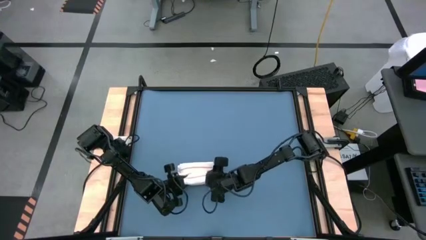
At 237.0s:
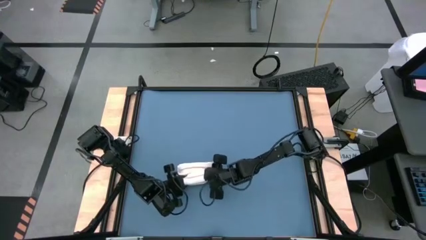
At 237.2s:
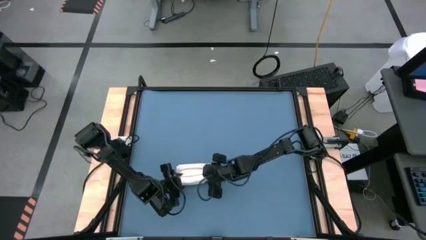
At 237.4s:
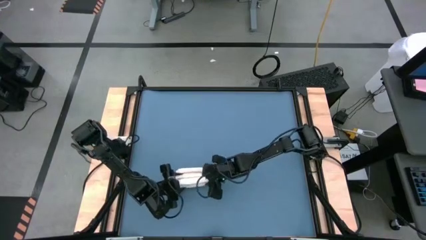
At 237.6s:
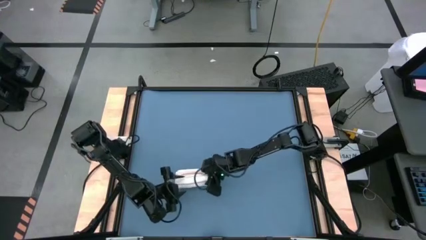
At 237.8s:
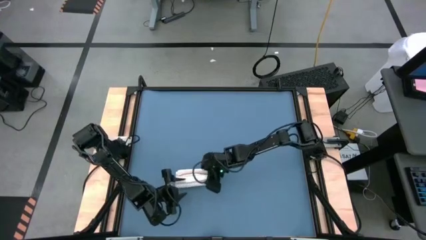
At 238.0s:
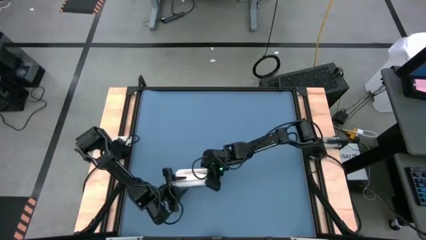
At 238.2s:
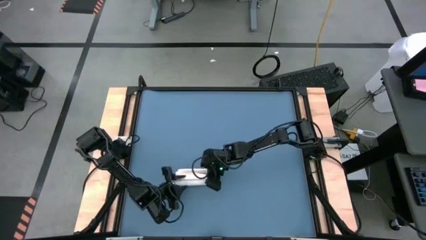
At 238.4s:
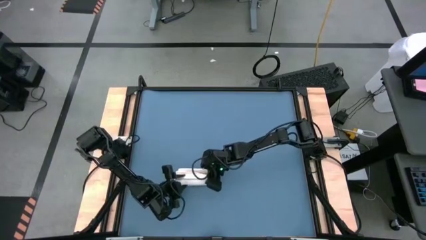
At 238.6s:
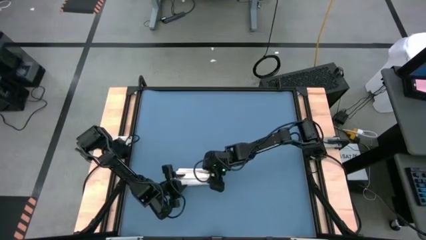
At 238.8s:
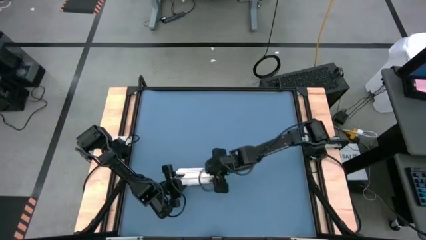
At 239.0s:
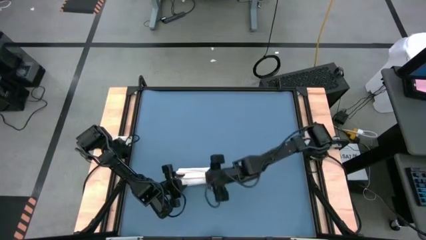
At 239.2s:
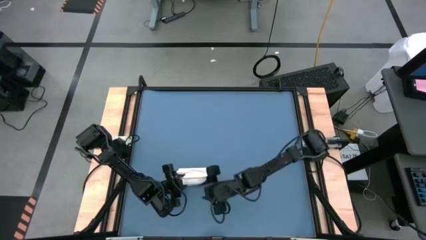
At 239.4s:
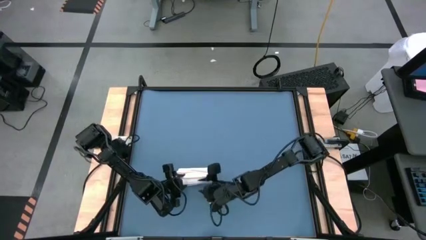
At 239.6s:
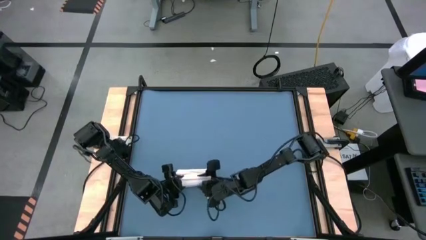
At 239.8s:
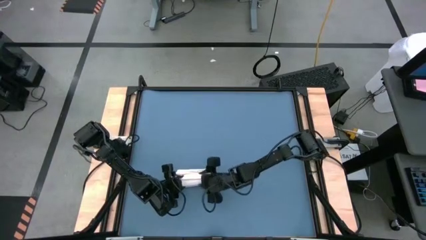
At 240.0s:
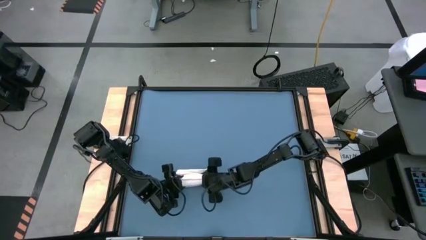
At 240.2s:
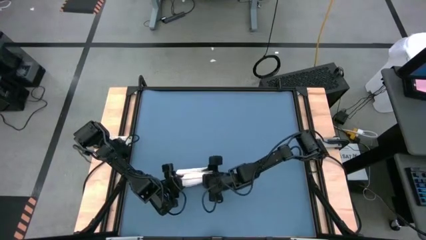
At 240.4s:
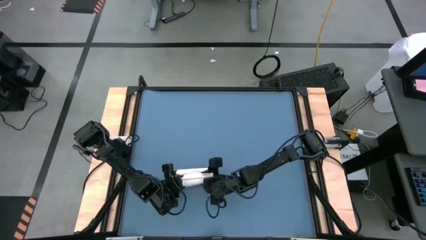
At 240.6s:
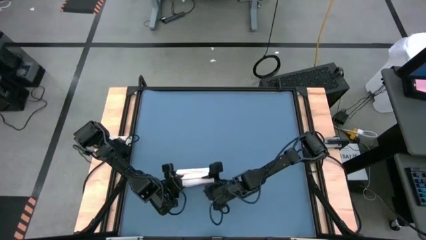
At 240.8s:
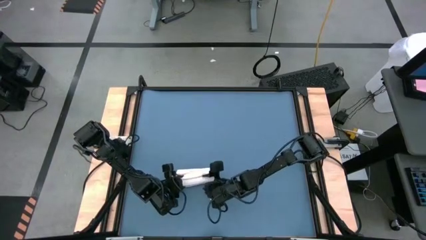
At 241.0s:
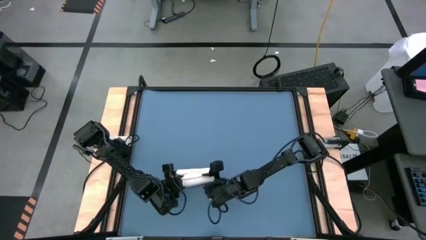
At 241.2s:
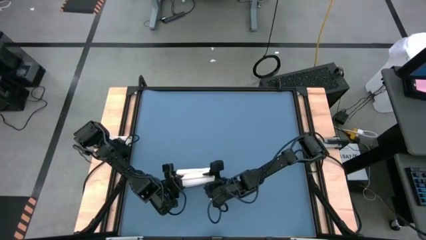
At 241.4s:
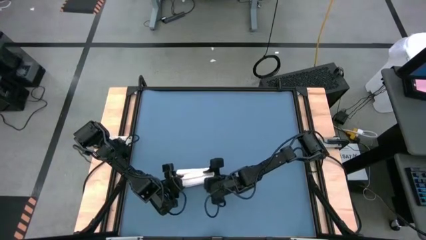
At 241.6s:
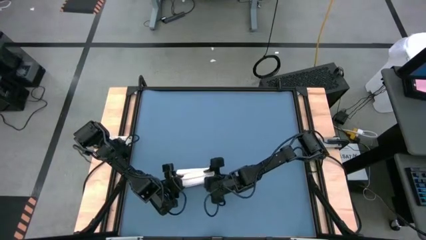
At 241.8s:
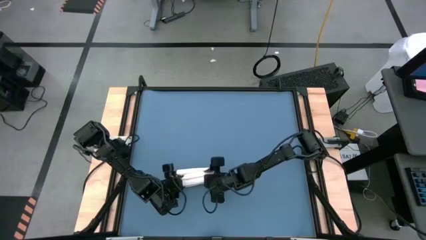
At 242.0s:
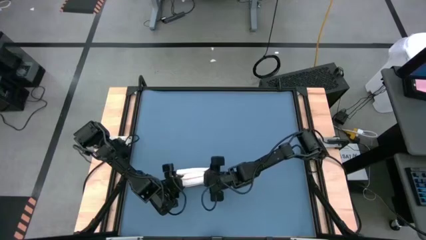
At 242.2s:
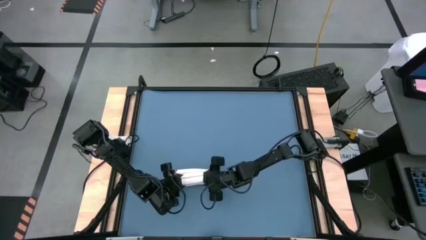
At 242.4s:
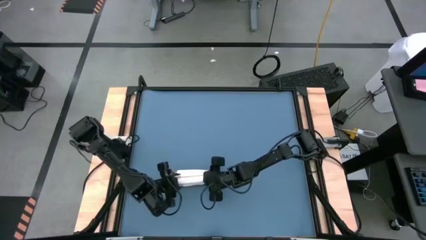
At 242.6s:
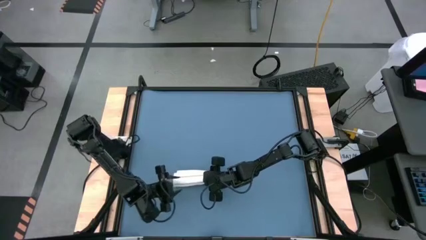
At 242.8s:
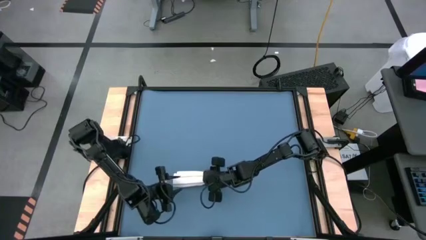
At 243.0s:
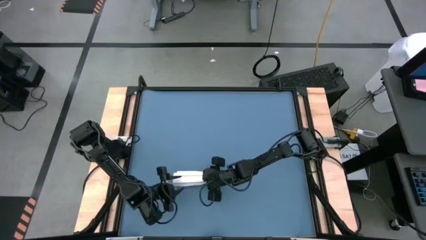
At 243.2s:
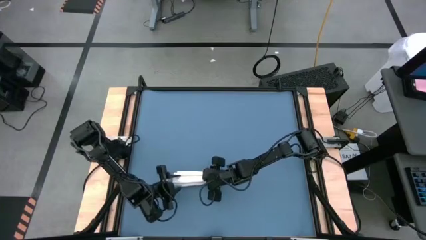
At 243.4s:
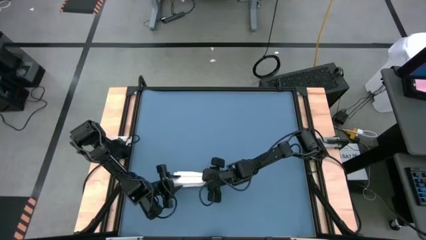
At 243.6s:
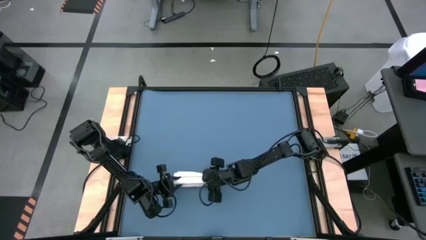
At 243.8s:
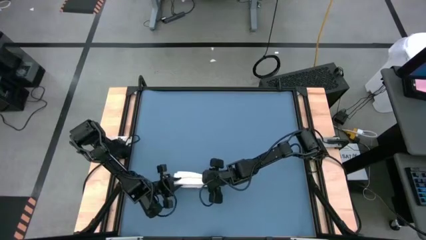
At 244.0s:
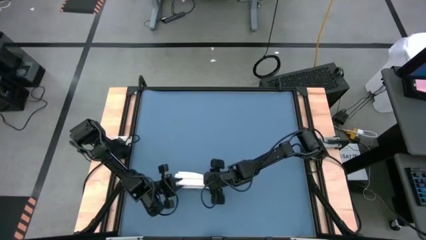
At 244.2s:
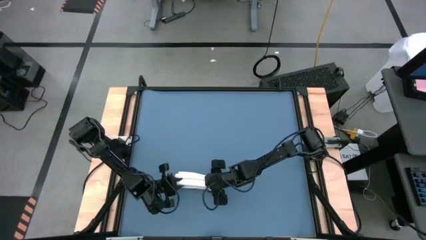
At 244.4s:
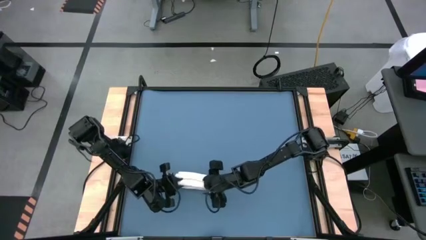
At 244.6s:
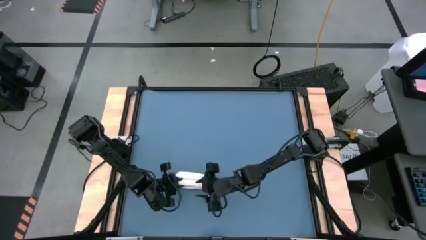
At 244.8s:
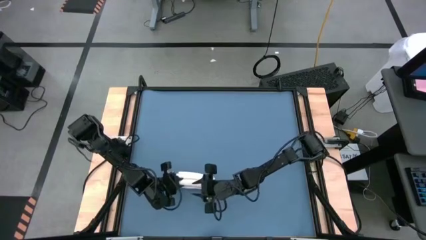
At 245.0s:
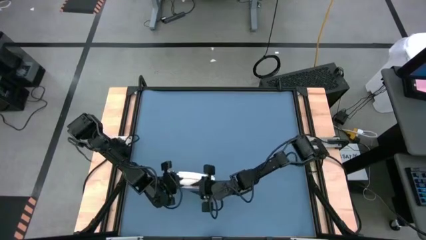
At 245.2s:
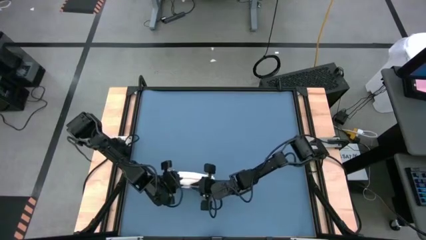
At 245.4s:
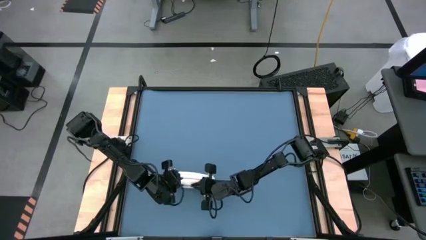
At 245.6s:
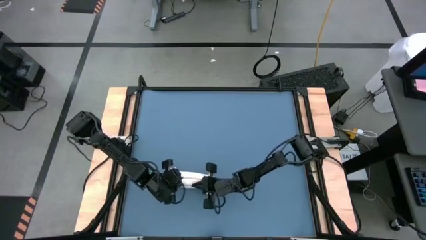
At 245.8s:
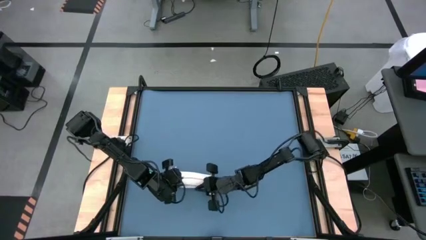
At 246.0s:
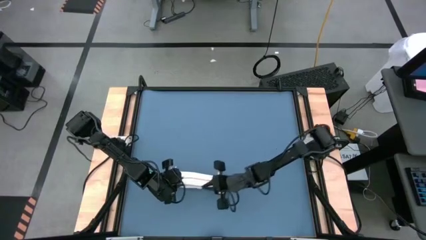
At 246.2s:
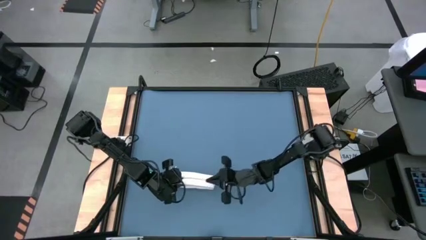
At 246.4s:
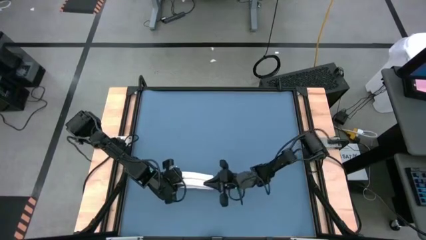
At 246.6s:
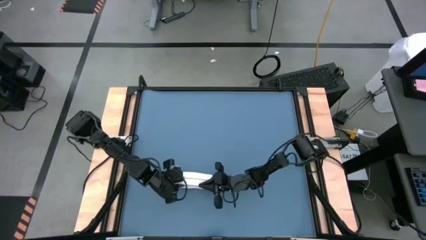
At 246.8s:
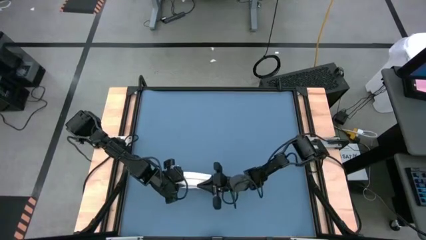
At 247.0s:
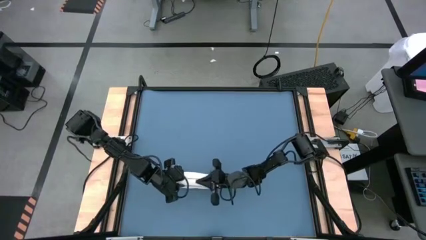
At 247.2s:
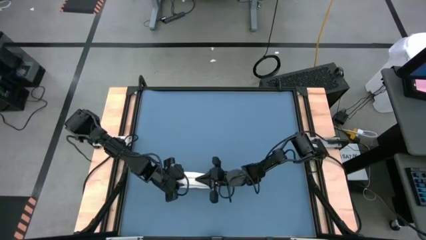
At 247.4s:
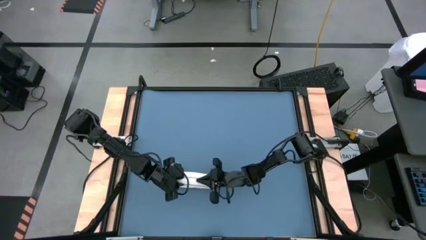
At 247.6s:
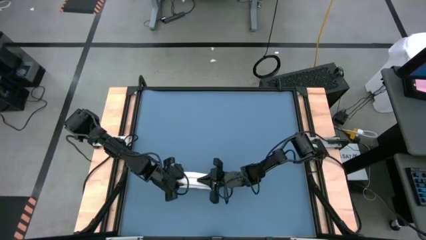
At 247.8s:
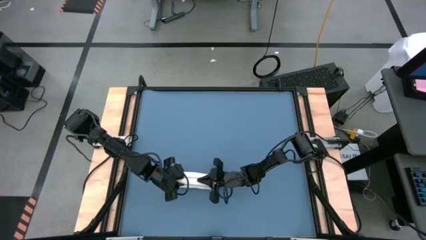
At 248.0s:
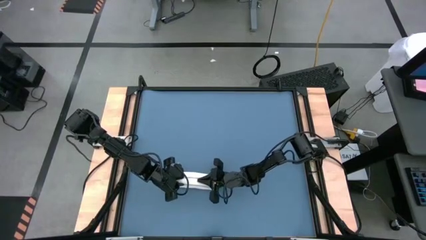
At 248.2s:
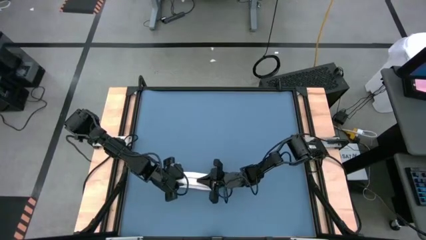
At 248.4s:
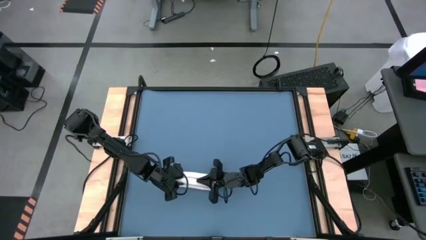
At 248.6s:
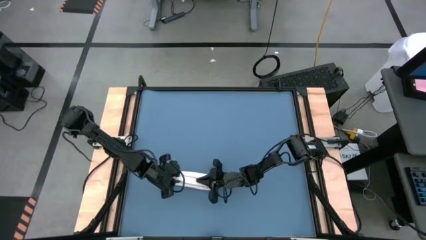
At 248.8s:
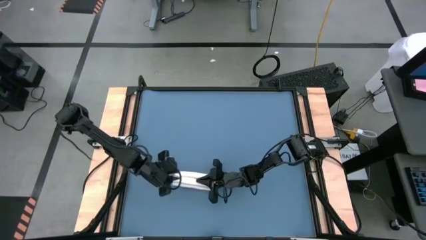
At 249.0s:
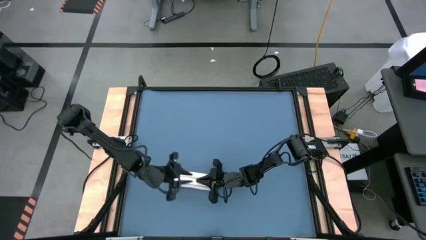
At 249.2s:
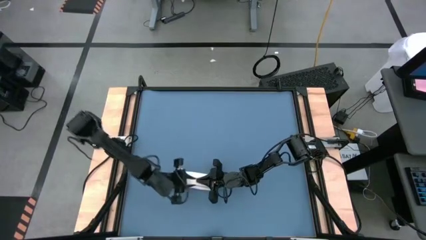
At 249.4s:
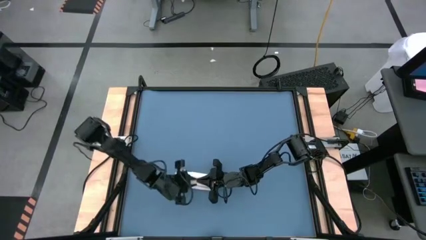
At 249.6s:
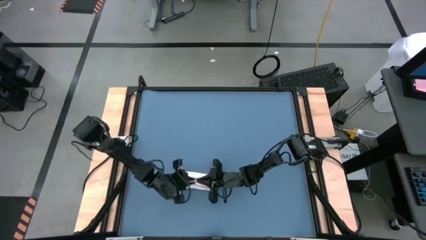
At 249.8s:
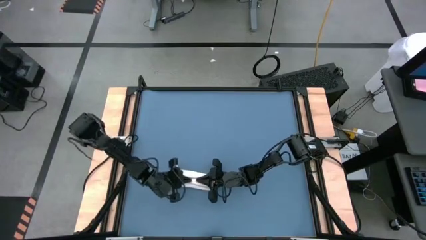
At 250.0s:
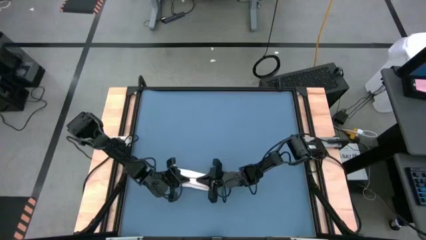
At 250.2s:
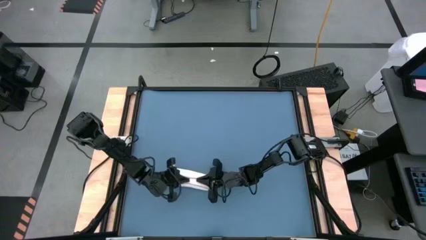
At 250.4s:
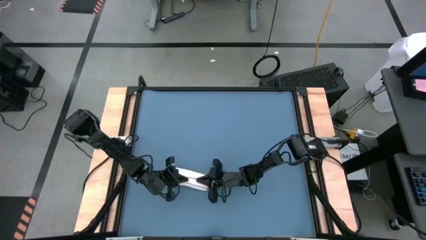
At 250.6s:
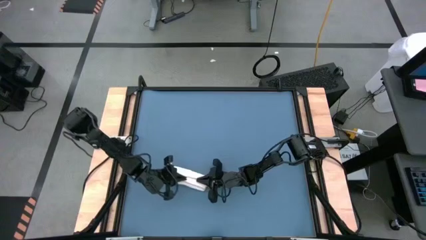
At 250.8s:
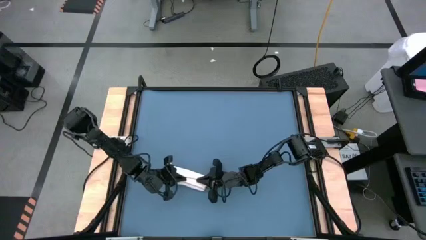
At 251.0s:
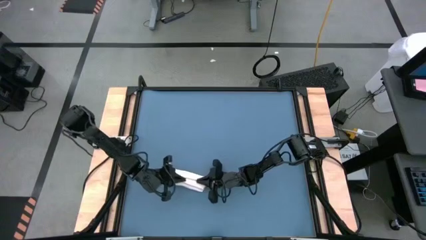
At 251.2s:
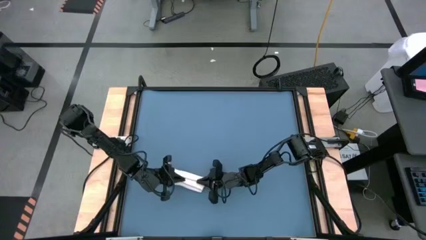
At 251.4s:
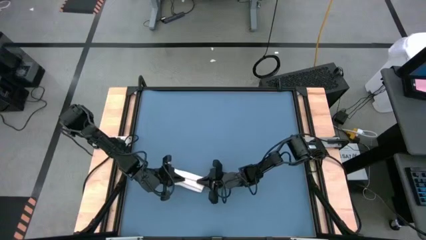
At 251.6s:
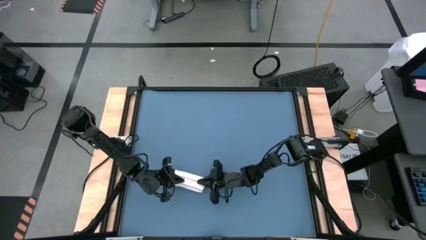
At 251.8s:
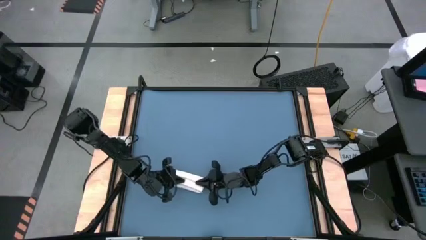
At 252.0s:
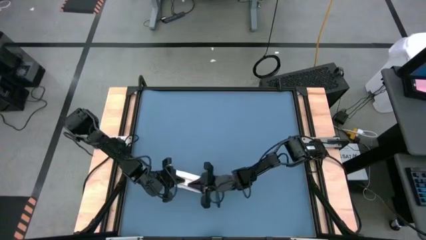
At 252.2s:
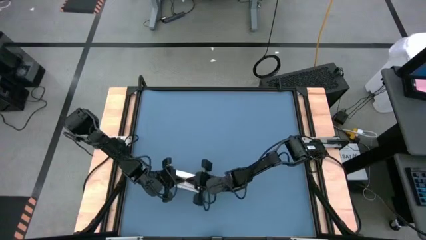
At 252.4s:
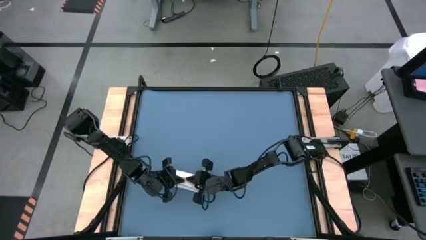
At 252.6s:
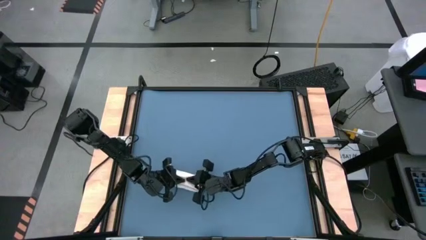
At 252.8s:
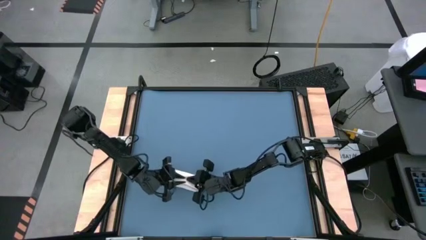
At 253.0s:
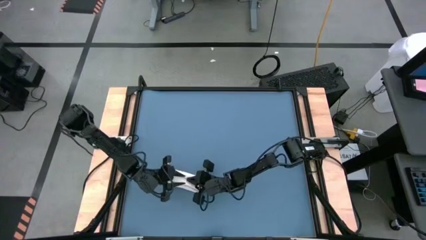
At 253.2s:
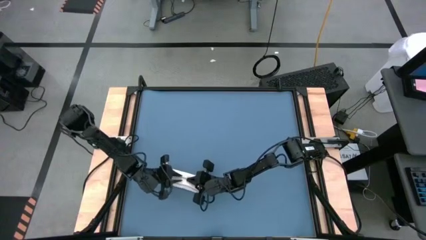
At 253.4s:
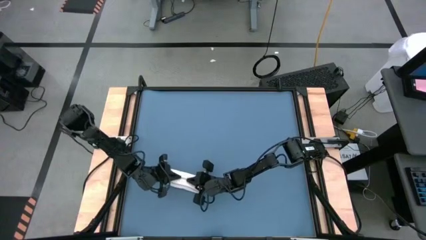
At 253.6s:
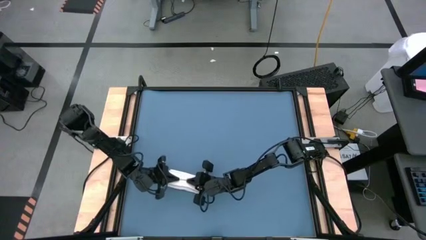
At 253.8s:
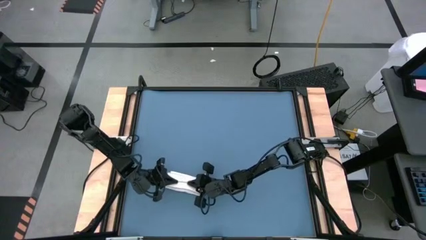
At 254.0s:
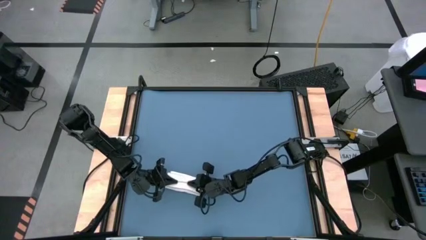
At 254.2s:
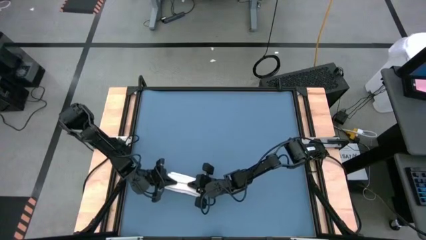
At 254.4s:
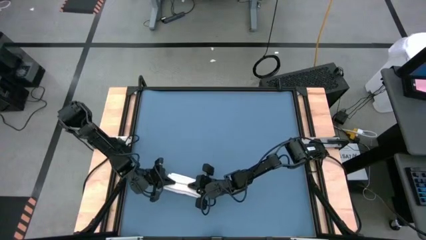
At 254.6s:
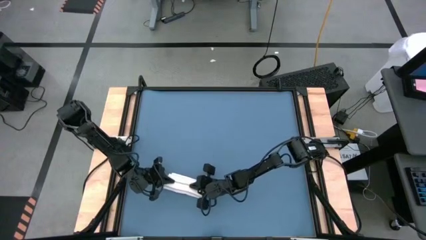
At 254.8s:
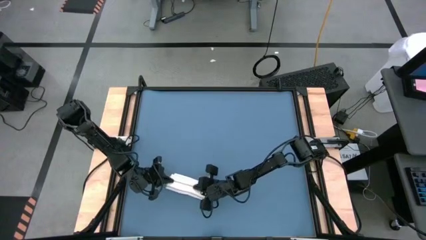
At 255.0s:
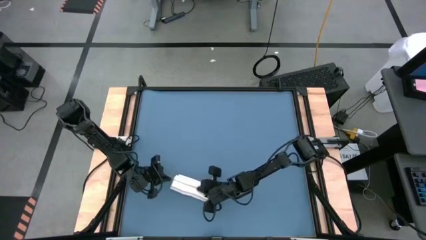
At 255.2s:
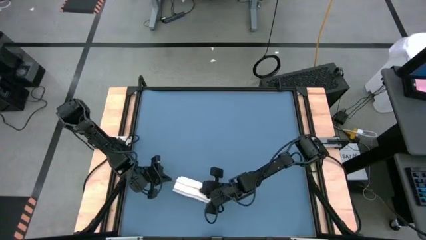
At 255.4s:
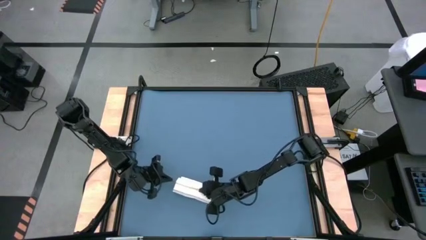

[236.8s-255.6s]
Task: Roll towel
Roll the white towel
